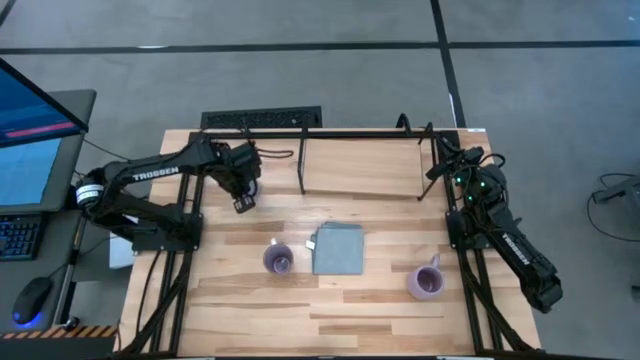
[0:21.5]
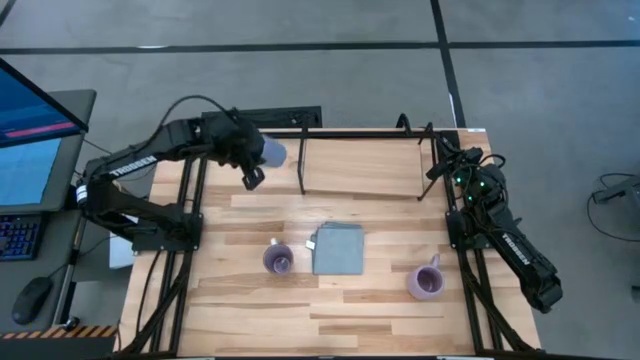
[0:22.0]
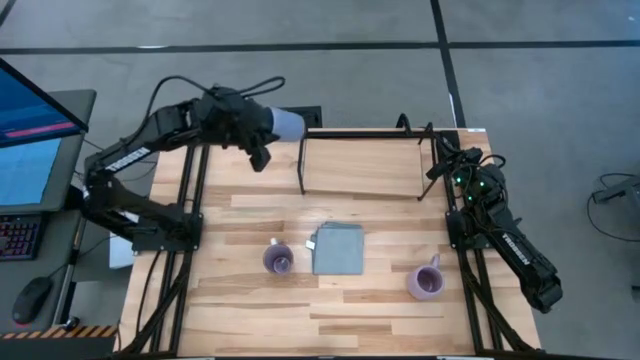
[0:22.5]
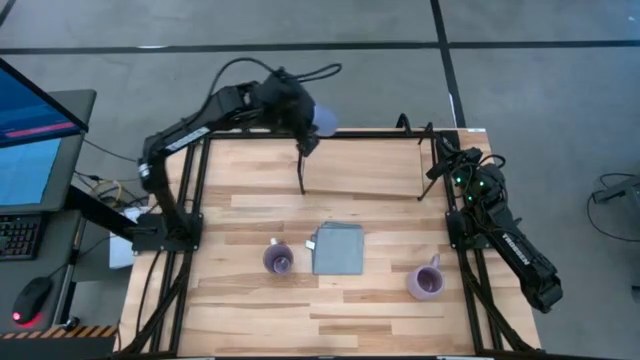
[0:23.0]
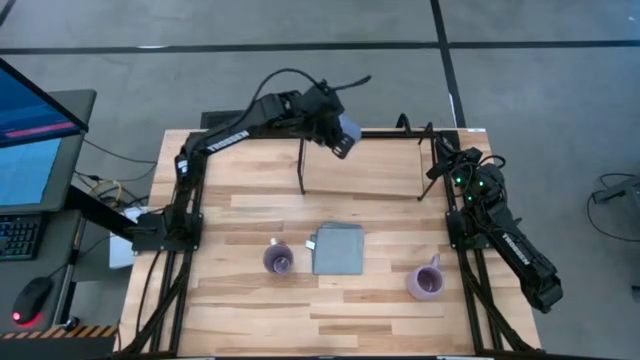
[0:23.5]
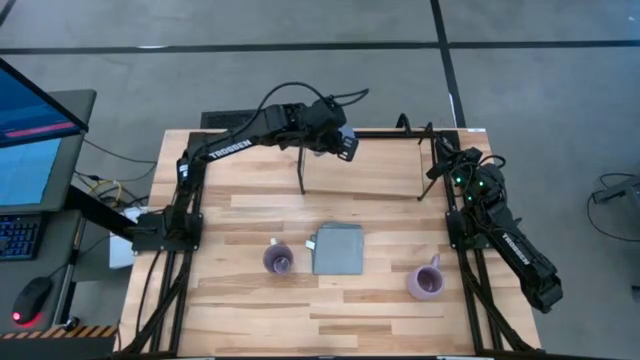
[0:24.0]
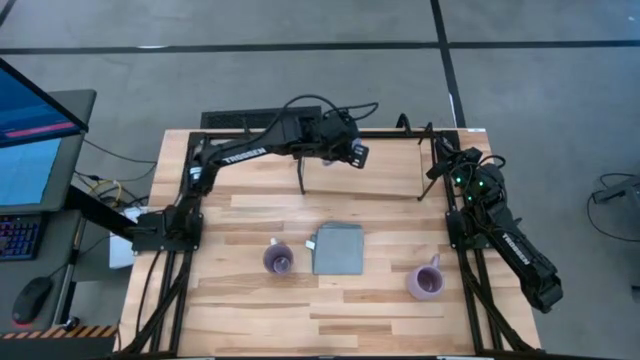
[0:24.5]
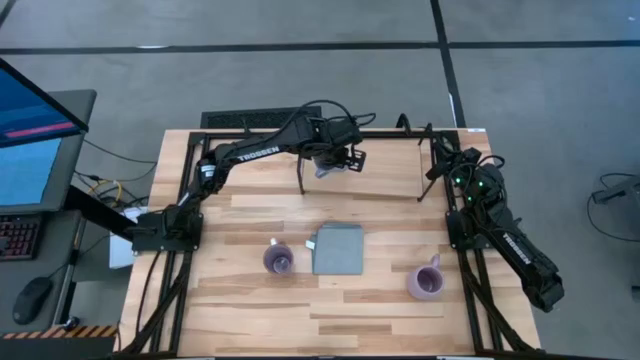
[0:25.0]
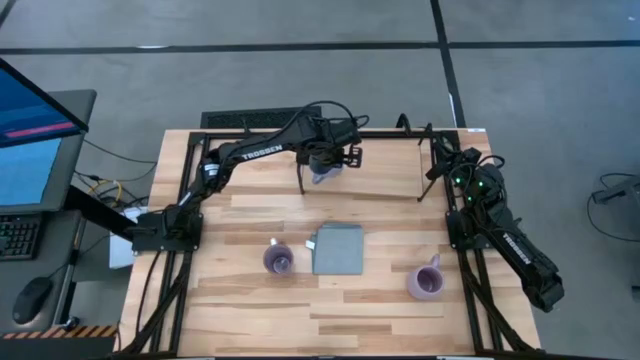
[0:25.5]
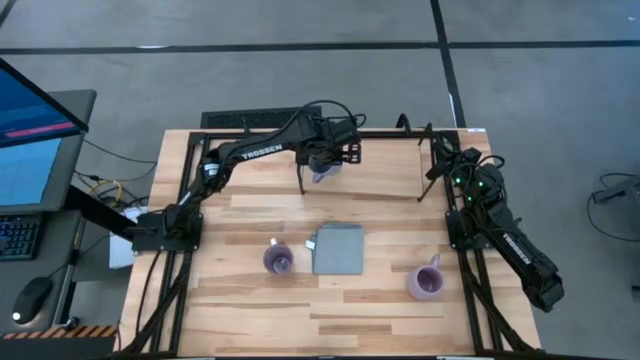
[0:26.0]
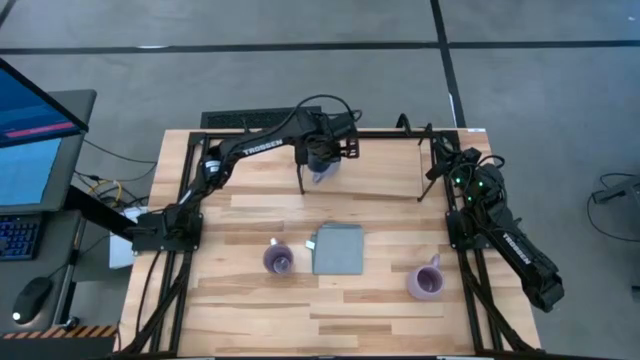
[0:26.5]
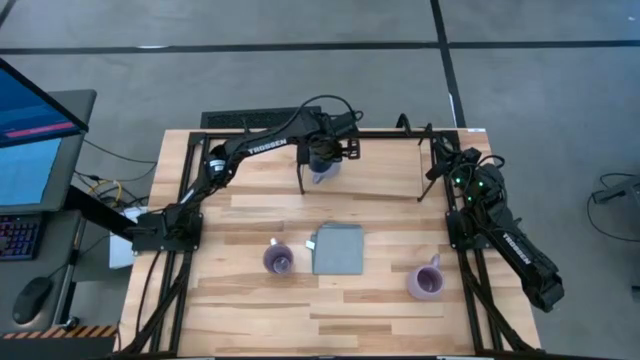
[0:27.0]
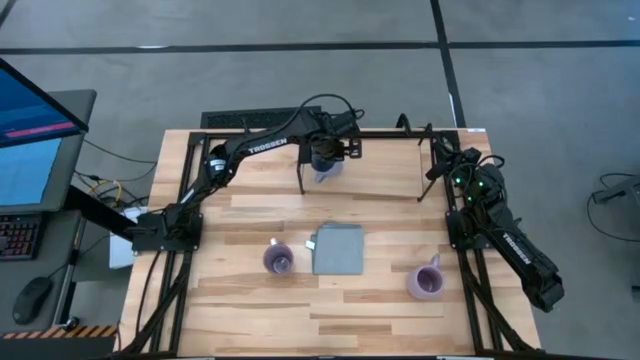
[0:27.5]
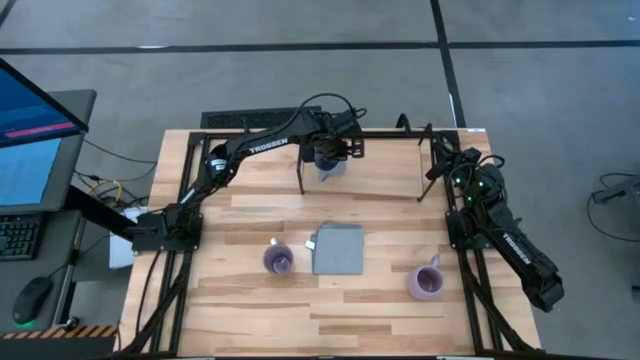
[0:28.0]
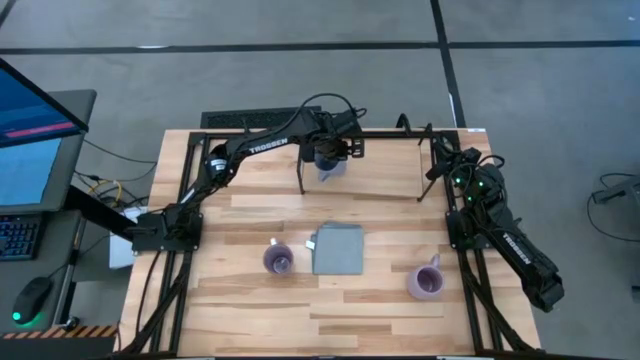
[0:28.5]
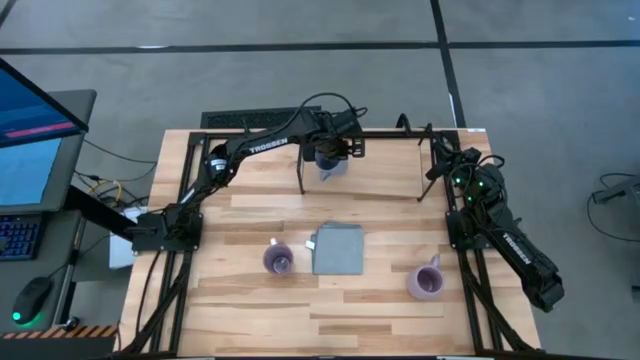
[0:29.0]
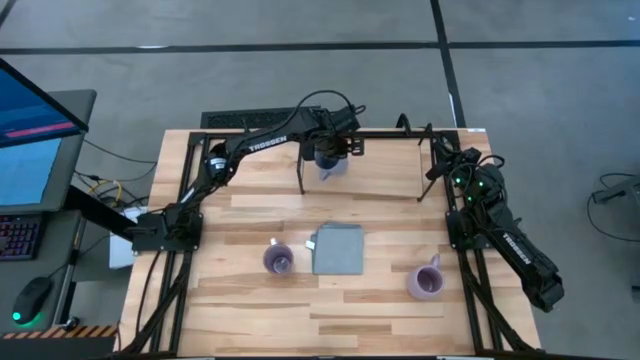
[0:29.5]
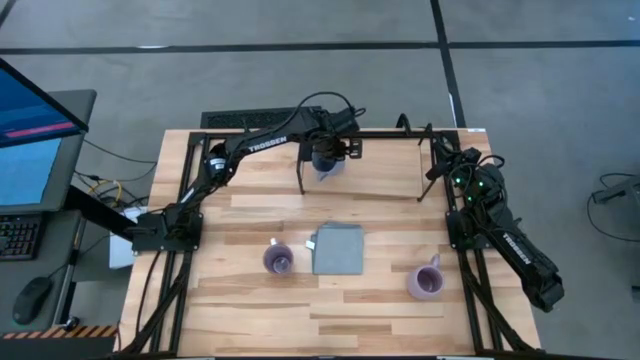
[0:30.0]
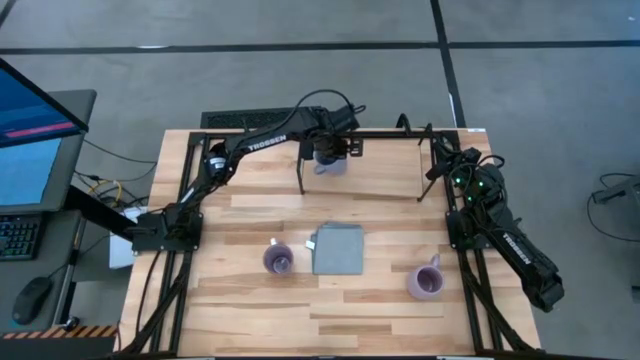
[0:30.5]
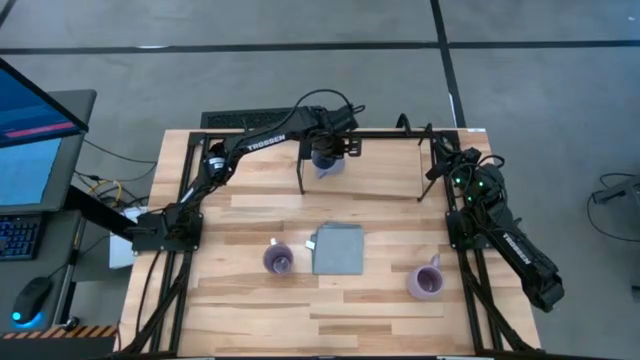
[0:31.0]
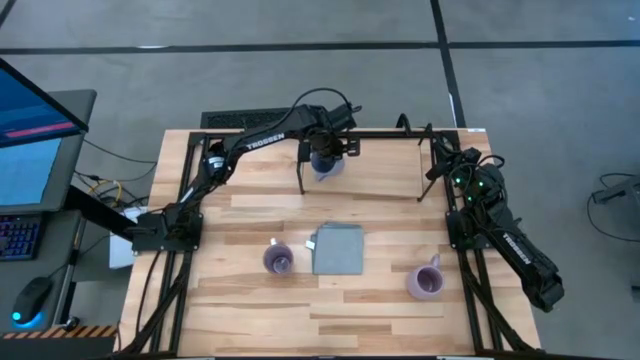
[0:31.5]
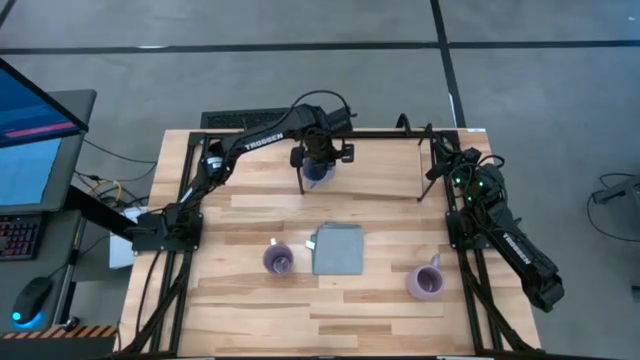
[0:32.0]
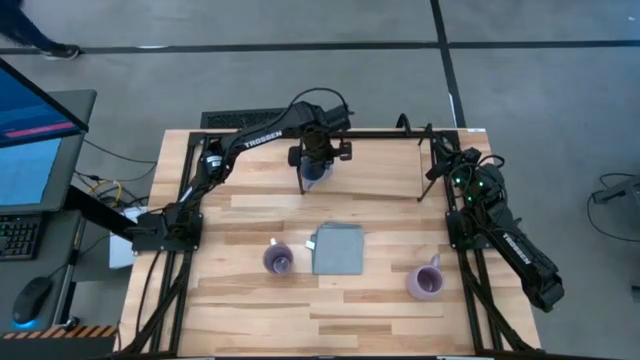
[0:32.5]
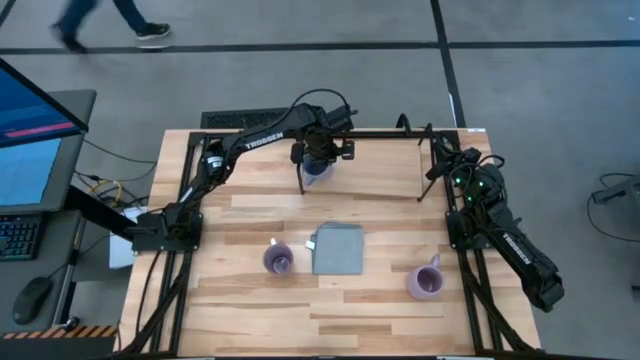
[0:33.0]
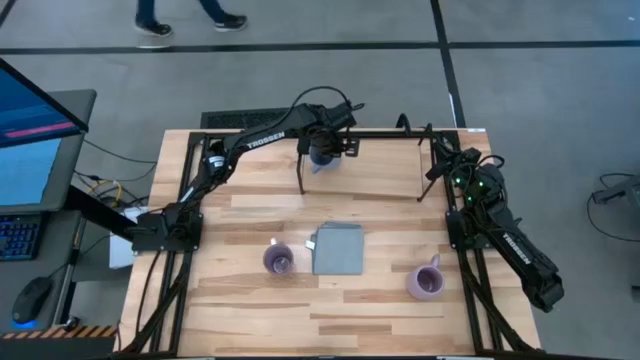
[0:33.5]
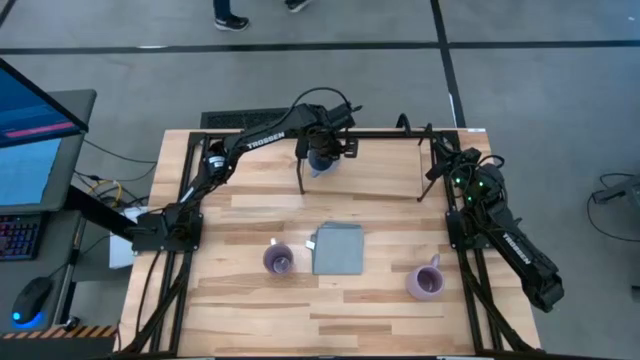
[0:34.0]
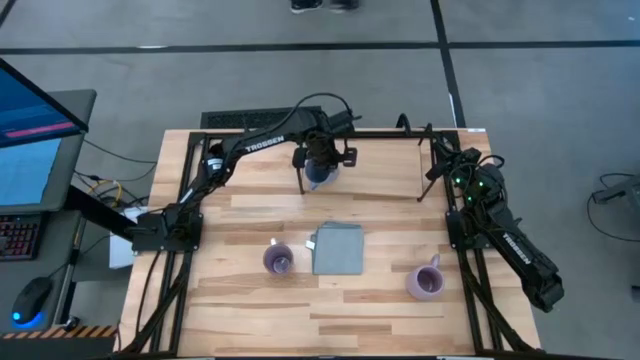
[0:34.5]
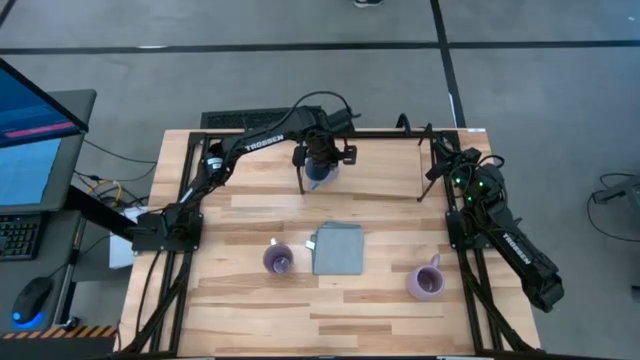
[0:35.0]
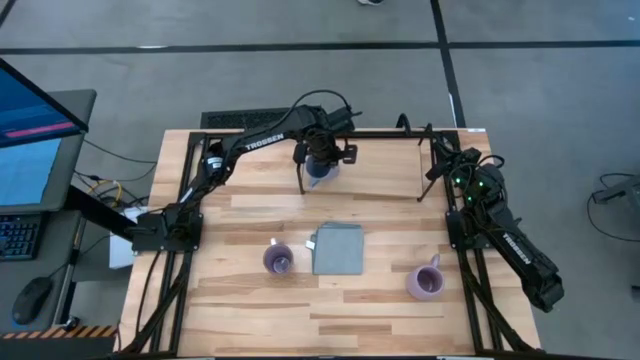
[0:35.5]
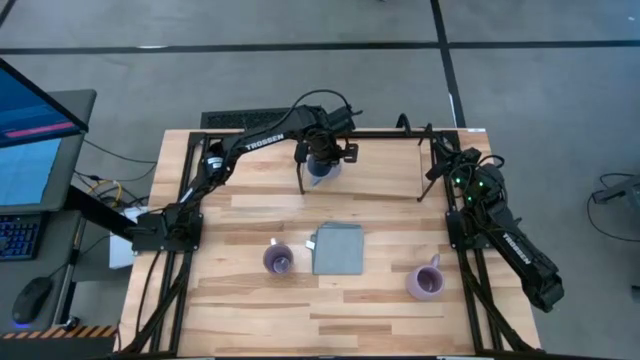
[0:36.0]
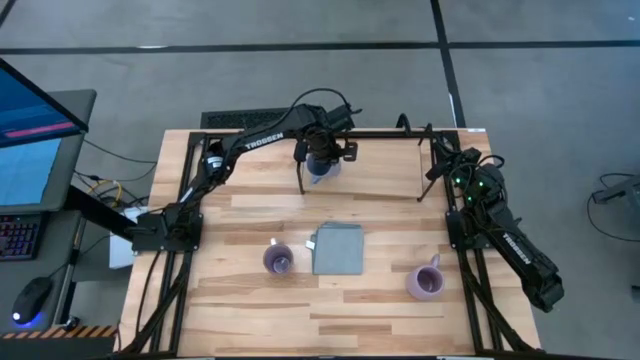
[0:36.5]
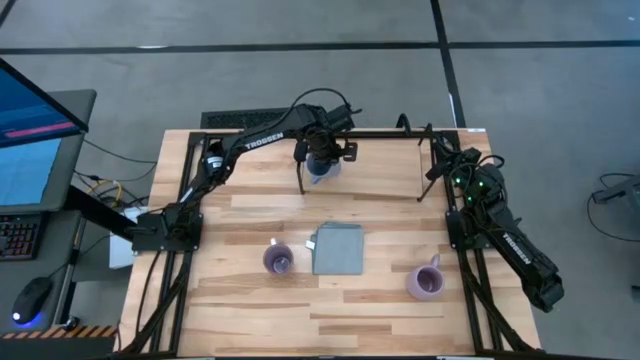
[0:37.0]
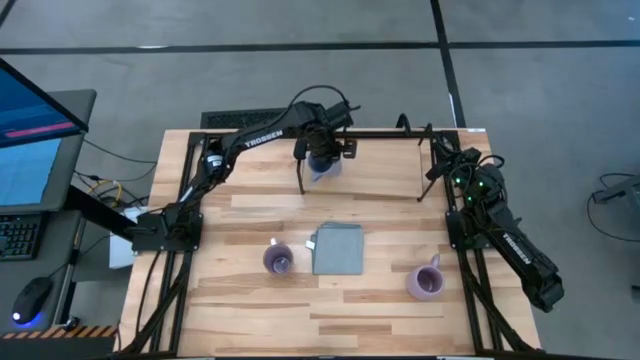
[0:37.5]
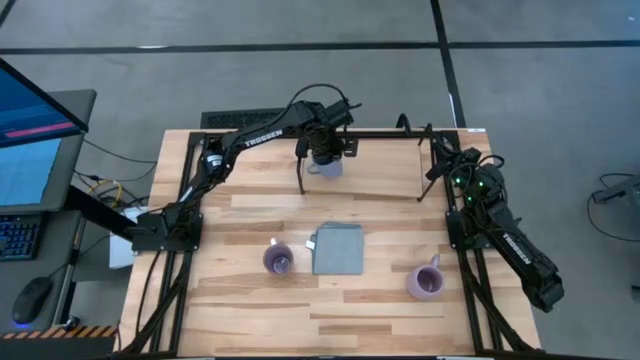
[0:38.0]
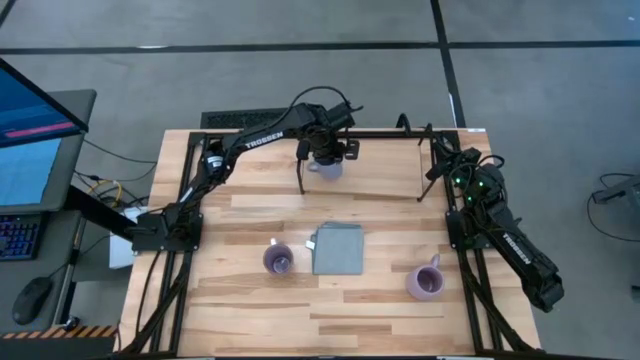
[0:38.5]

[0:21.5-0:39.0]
Task: Stack small to large cups/mugs on shelf
Put the light blue cup on the shelf

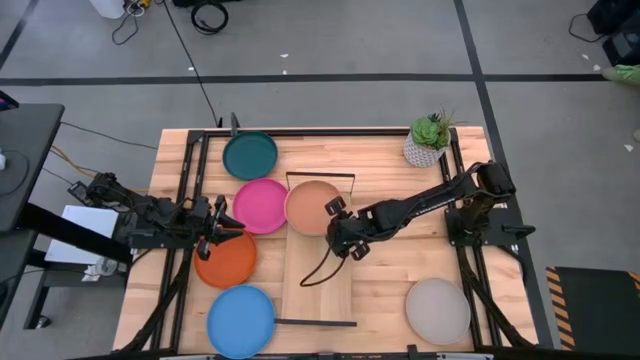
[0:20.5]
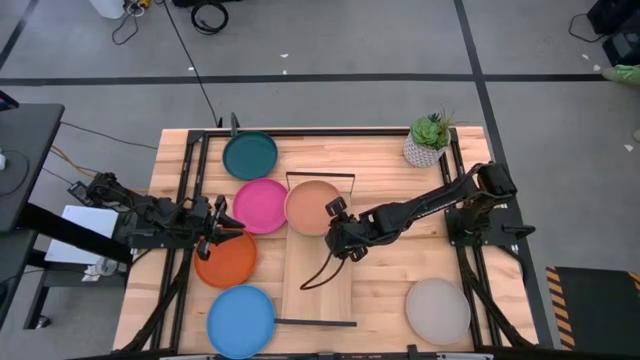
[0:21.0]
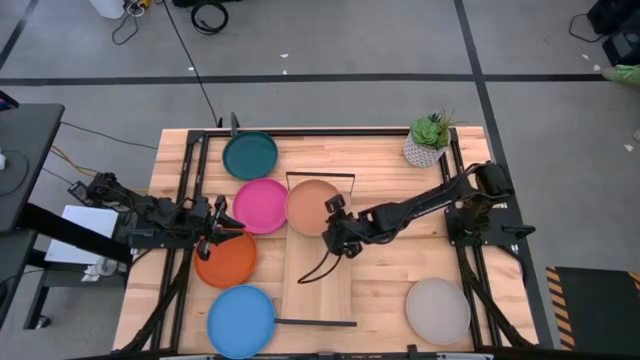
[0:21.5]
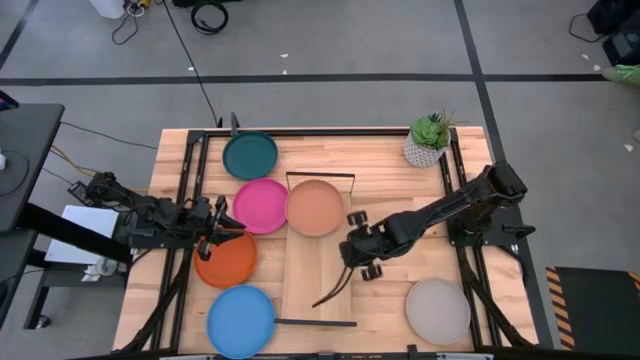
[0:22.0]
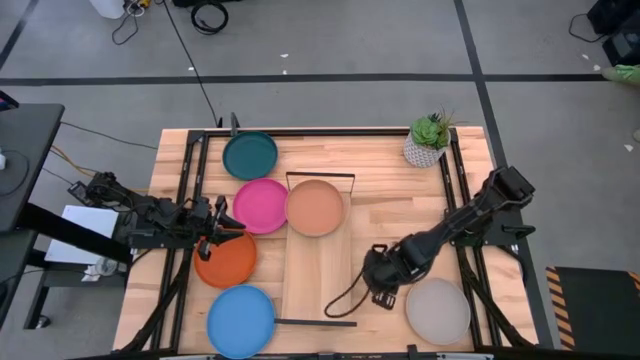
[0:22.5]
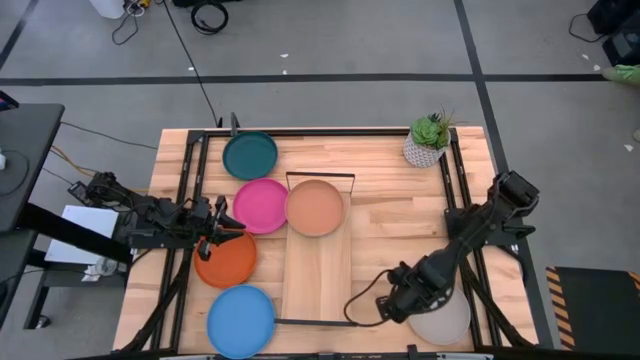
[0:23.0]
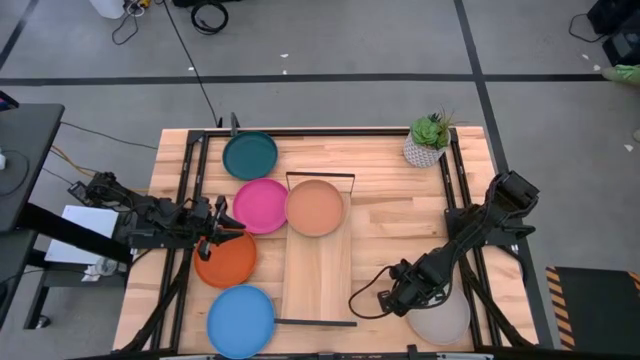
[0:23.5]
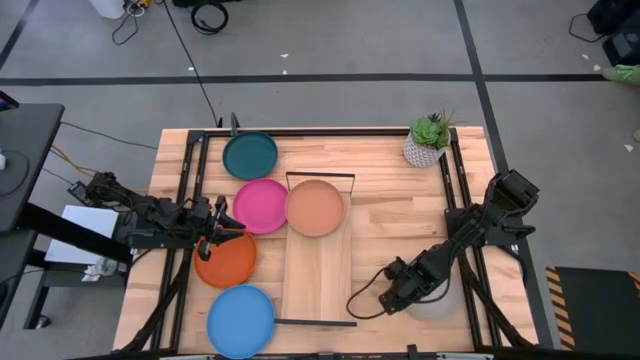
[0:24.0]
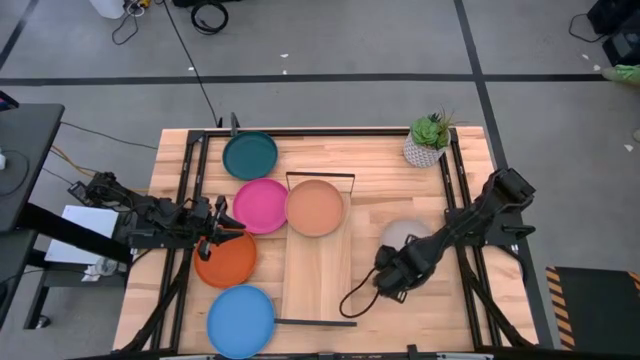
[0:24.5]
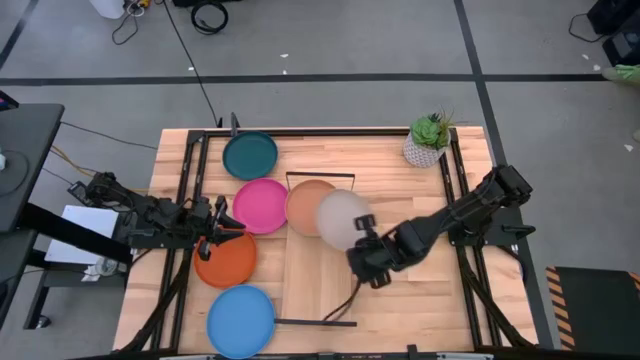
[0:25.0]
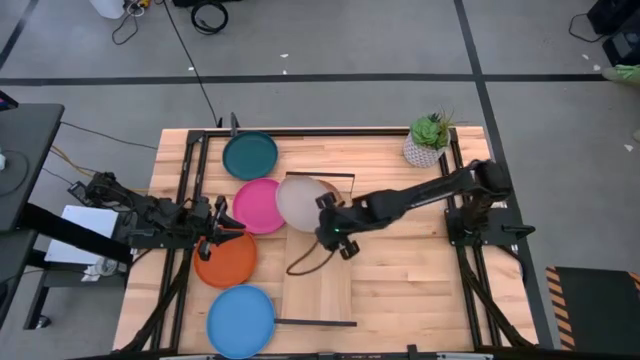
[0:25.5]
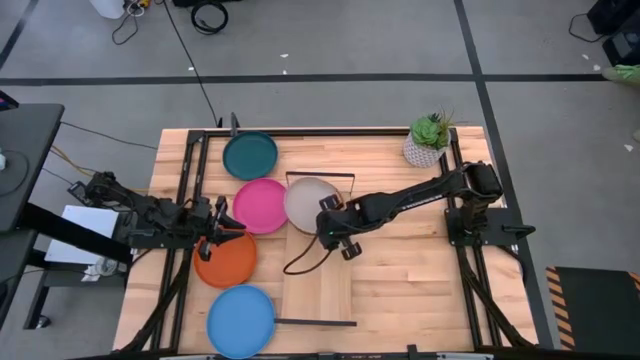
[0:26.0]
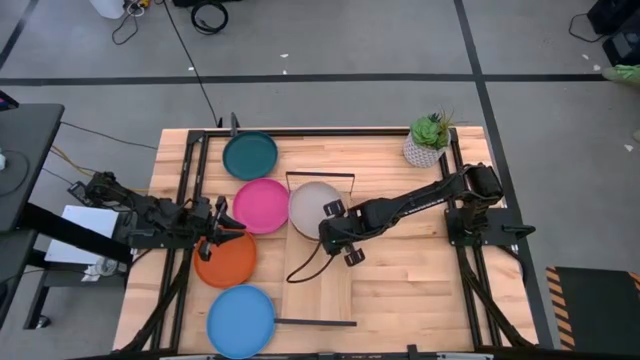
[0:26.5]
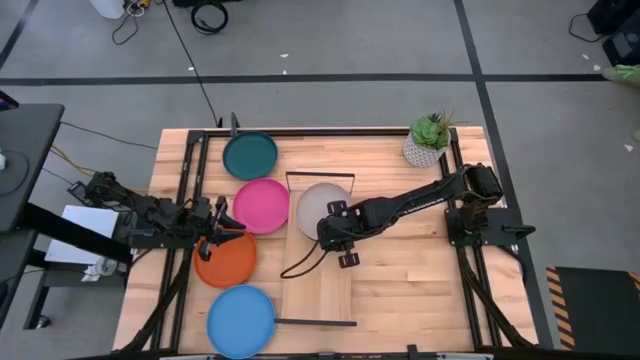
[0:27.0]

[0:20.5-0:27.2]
Task: Place and stack plates onto a shelf
Stack the gray plate on top of the light brown plate on the shelf
